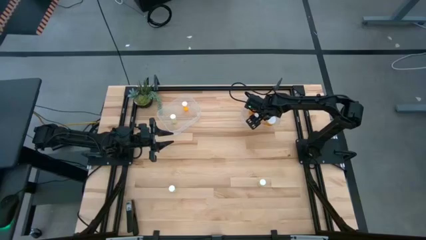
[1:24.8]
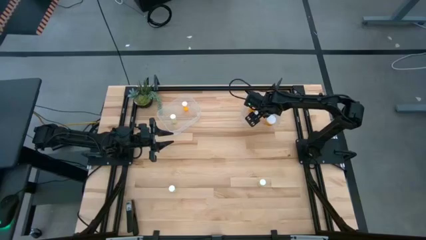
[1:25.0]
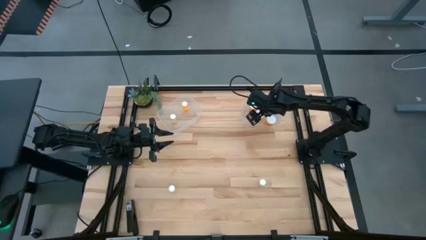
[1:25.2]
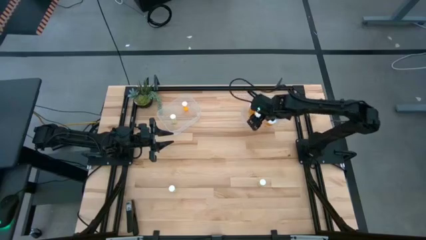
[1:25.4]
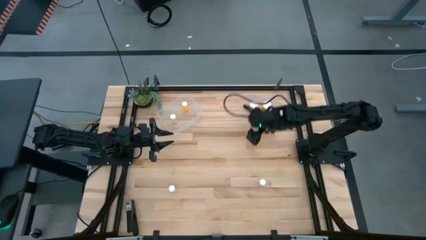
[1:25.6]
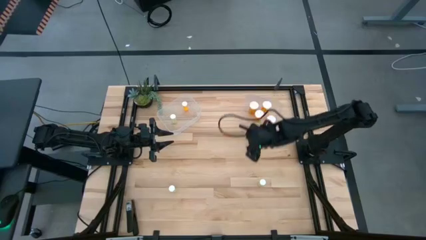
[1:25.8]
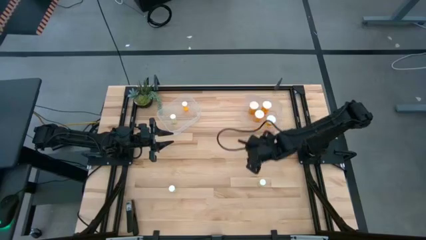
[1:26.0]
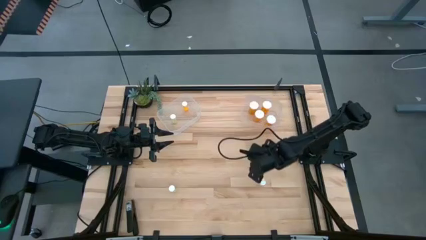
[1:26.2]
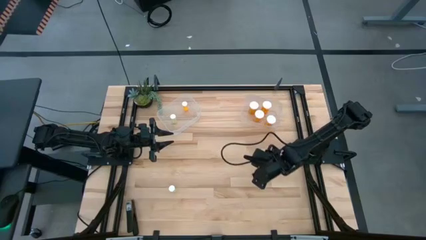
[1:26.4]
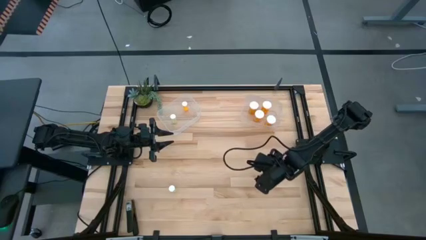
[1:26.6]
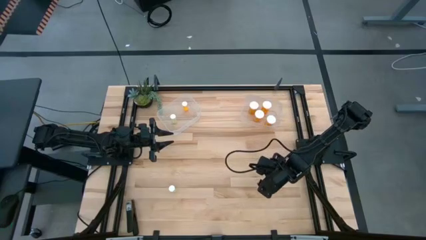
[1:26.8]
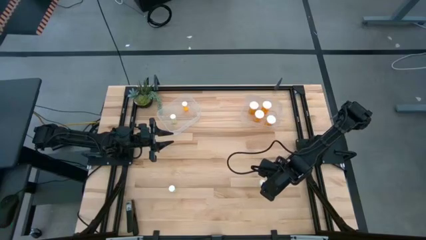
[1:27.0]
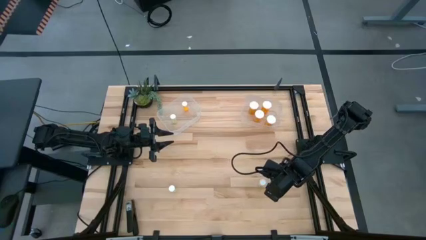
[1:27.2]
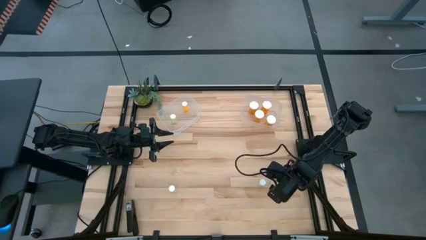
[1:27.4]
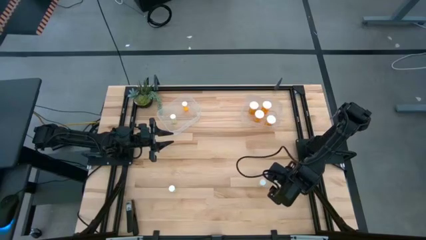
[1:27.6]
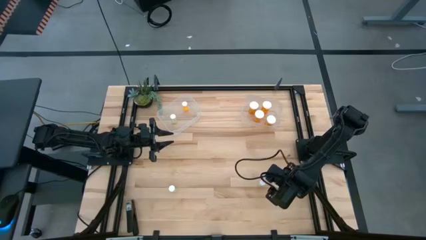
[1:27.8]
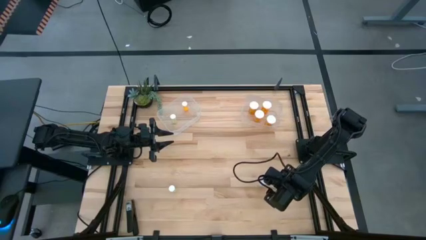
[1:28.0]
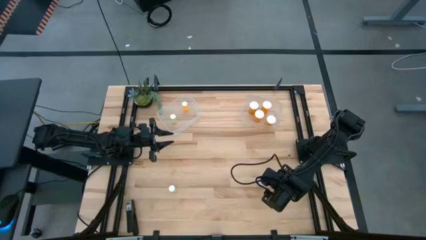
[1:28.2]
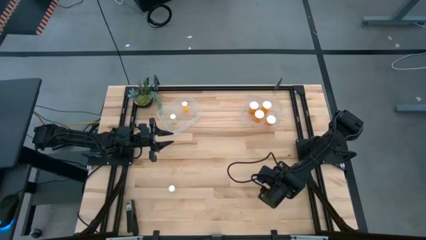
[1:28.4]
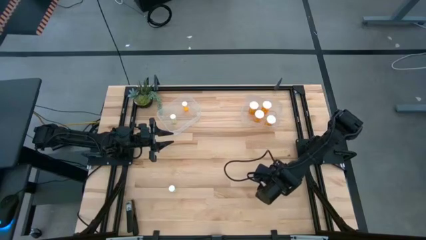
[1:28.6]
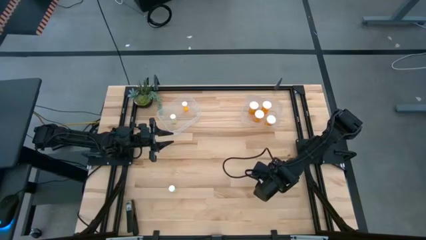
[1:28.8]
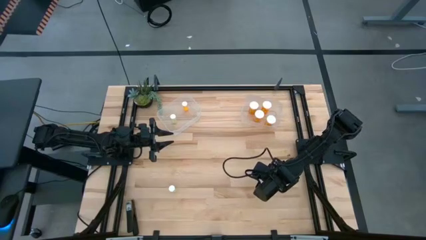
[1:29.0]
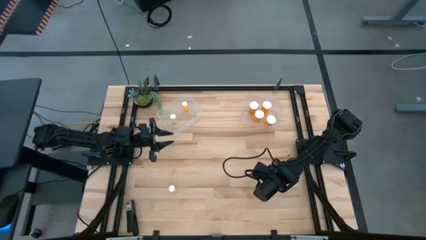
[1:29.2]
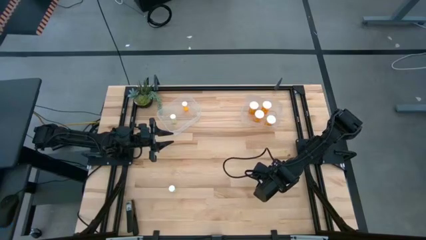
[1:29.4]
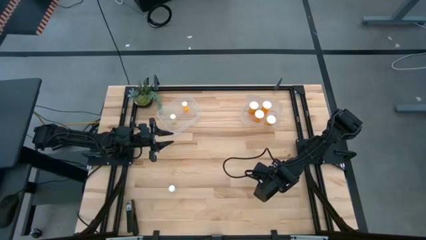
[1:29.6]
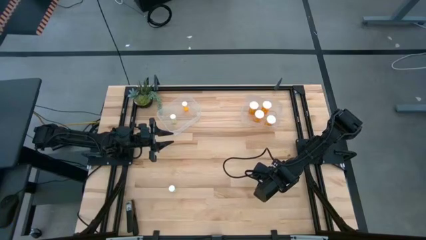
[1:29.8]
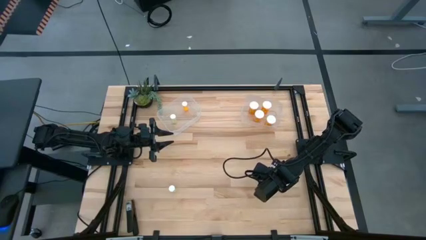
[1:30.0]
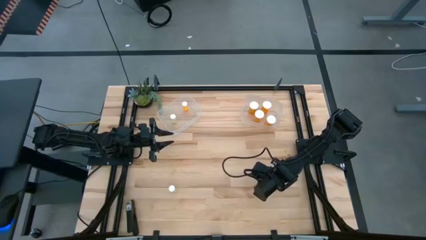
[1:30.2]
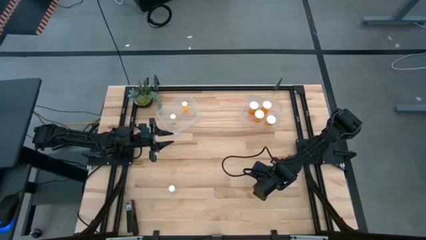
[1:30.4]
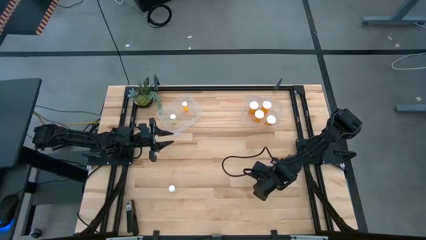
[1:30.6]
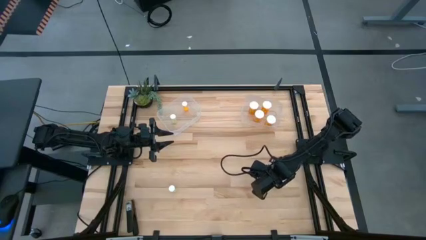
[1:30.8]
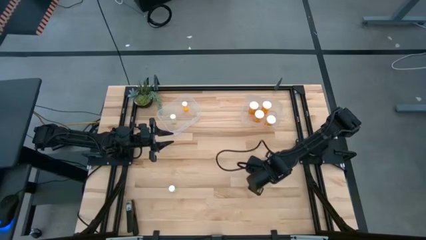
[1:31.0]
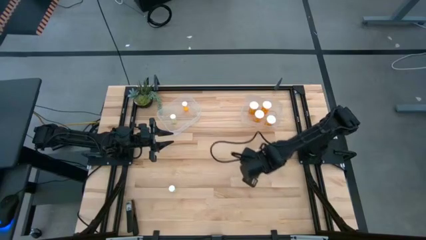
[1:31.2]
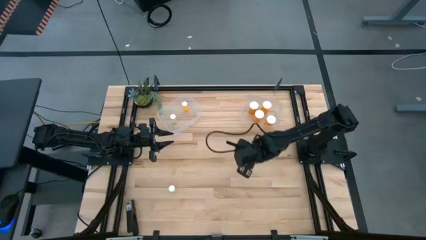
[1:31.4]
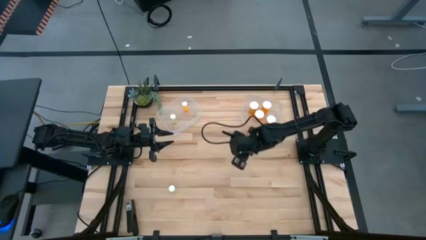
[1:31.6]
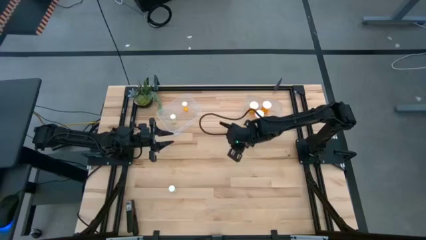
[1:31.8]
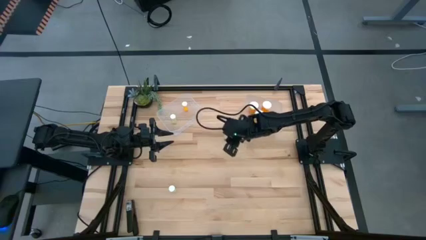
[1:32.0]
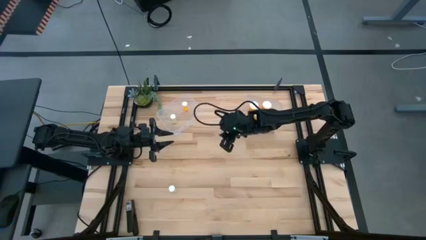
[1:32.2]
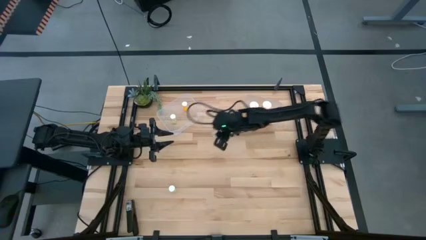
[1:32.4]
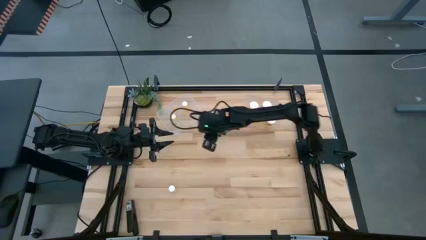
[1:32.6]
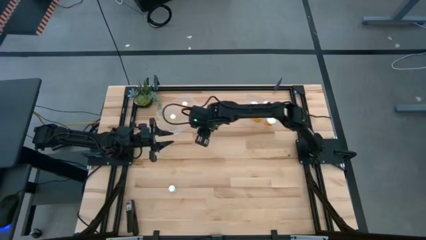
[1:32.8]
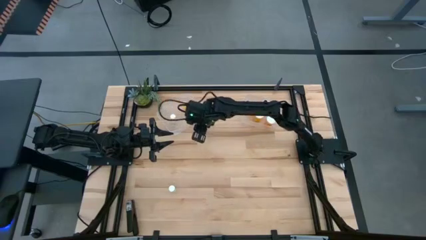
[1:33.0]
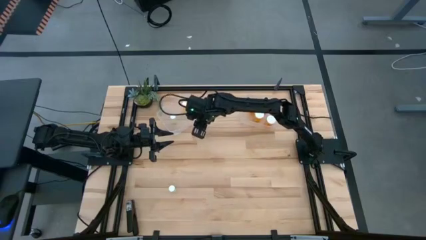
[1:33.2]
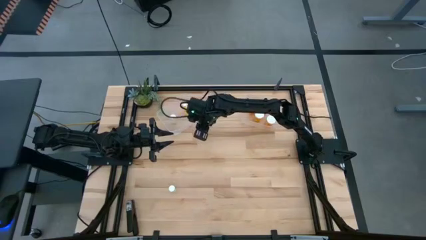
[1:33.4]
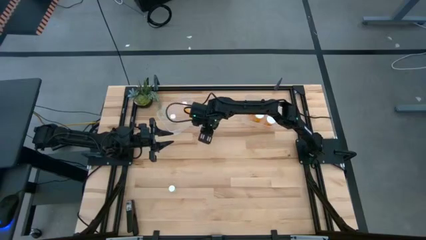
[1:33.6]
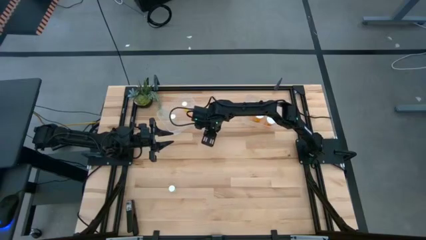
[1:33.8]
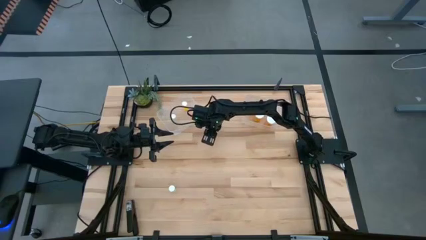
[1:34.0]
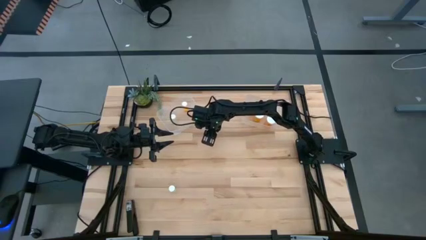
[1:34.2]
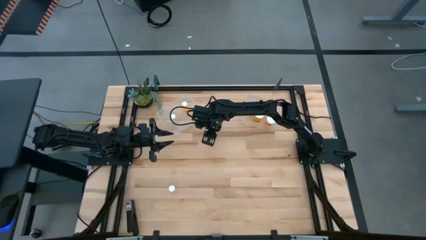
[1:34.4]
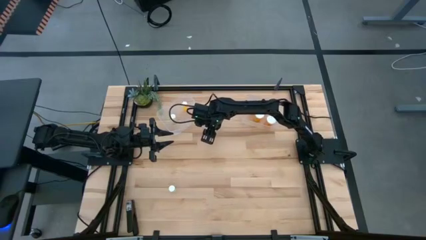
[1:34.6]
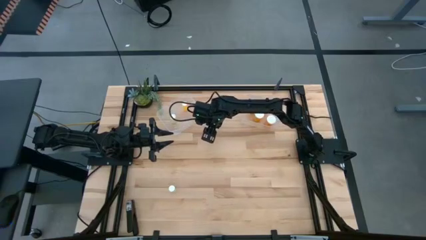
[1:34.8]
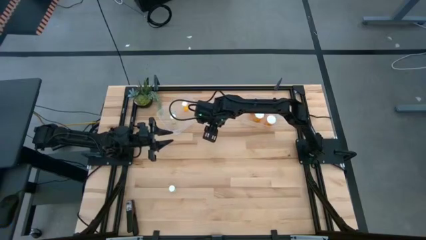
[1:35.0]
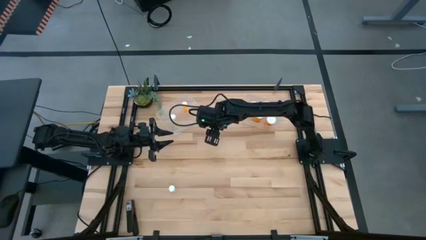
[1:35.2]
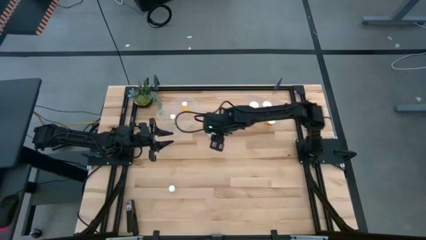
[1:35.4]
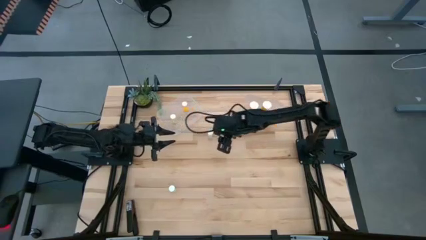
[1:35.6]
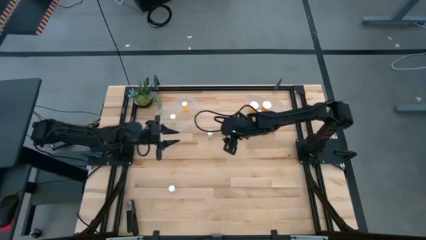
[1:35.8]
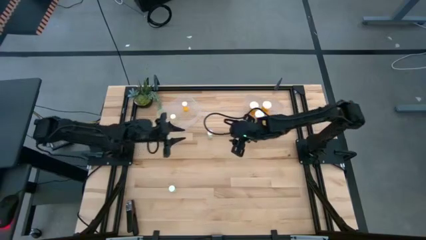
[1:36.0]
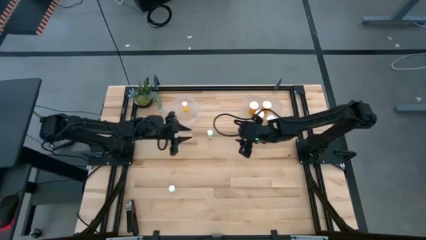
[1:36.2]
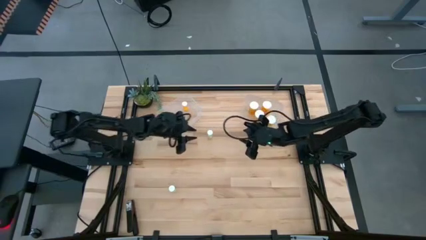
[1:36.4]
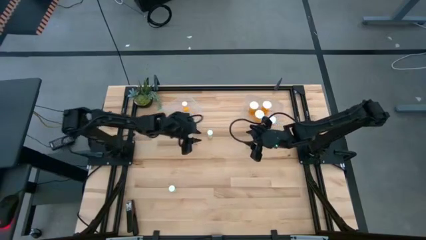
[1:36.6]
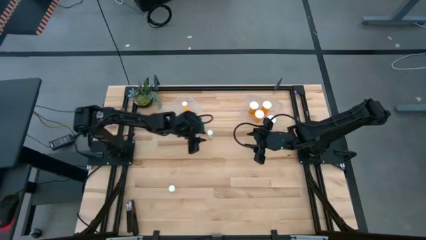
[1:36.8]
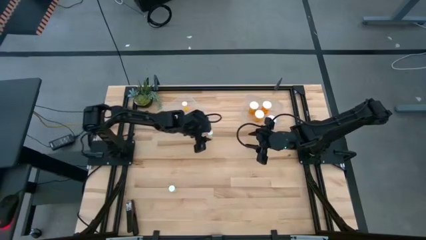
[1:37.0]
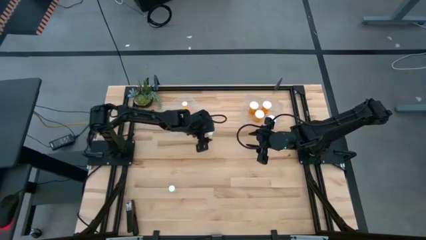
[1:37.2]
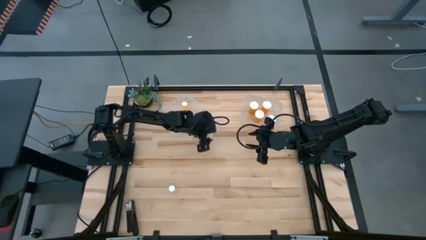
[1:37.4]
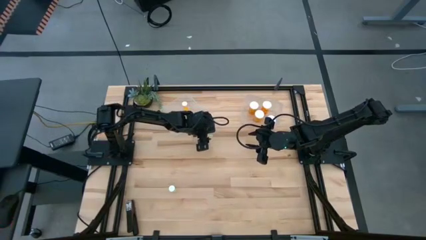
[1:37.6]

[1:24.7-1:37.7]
Task: Pick and place medicine bottles into bin by pill shape (circle, oval)
Put the small yellow pill bottle into the left transparent bin
